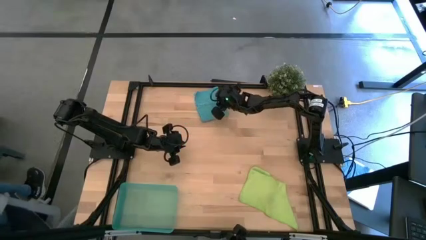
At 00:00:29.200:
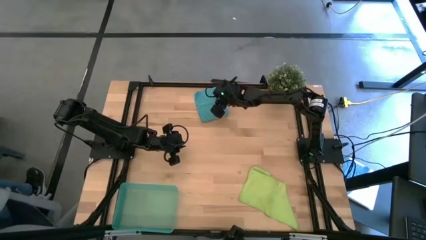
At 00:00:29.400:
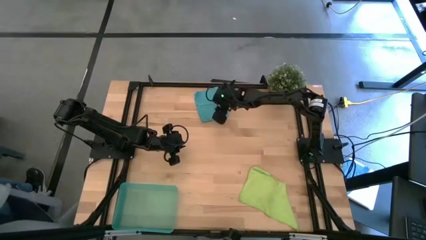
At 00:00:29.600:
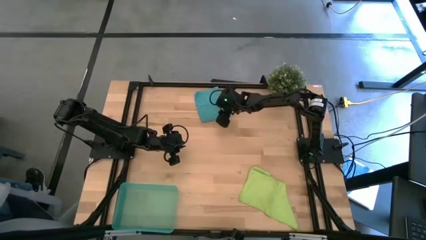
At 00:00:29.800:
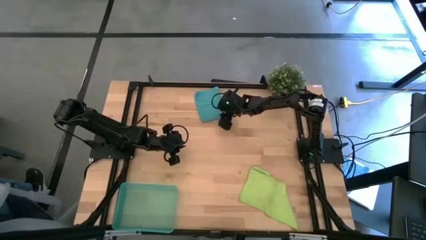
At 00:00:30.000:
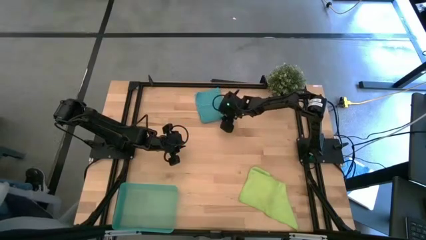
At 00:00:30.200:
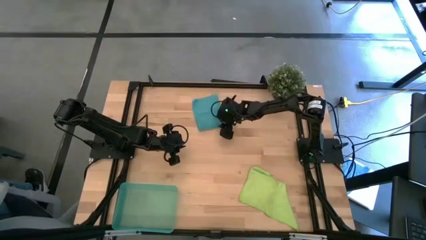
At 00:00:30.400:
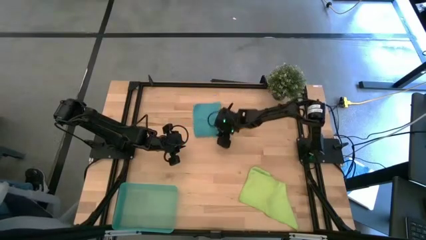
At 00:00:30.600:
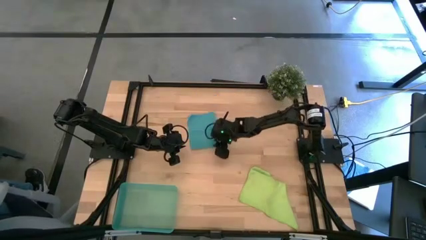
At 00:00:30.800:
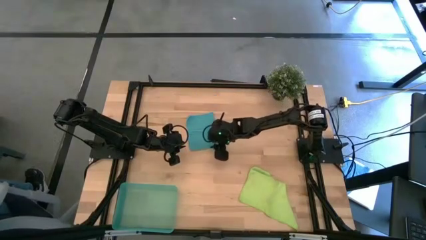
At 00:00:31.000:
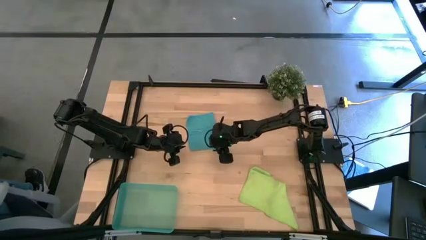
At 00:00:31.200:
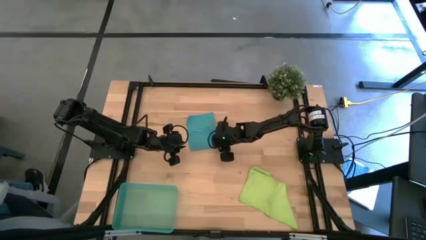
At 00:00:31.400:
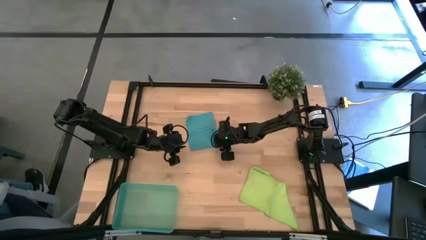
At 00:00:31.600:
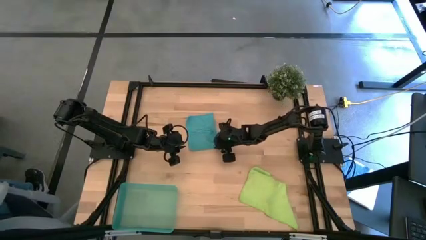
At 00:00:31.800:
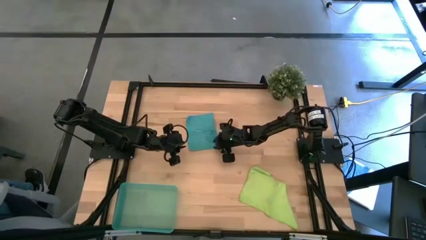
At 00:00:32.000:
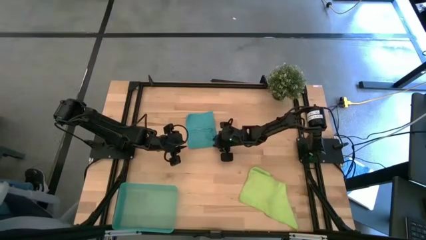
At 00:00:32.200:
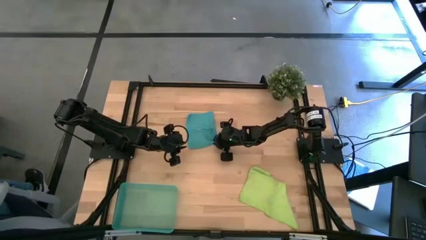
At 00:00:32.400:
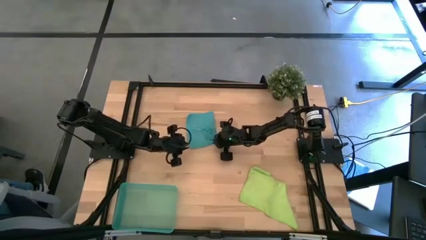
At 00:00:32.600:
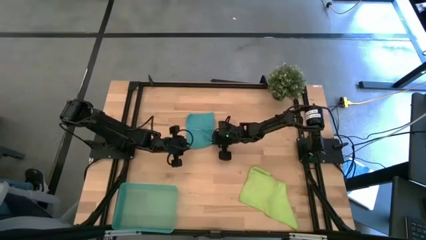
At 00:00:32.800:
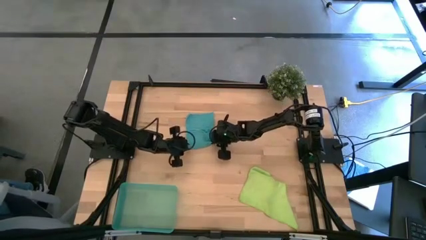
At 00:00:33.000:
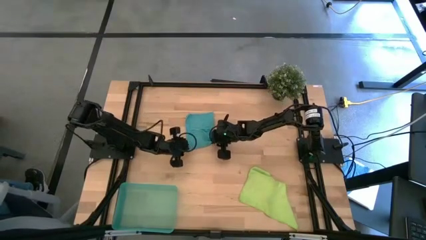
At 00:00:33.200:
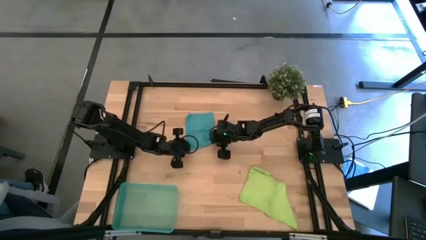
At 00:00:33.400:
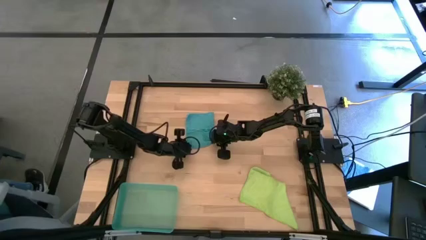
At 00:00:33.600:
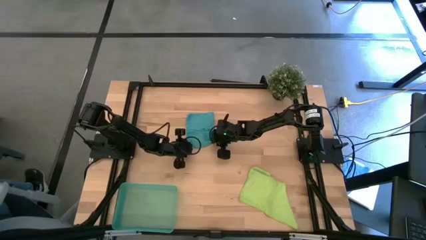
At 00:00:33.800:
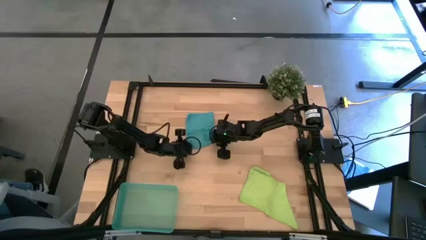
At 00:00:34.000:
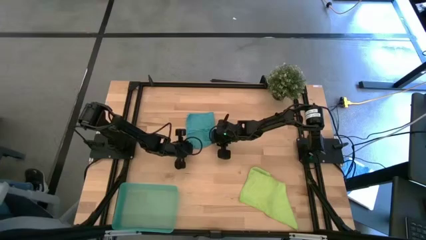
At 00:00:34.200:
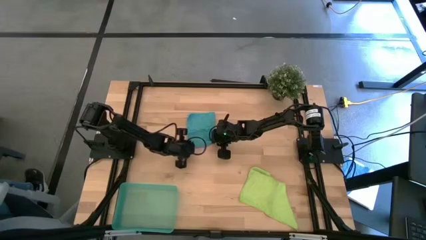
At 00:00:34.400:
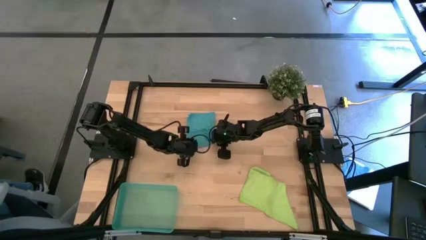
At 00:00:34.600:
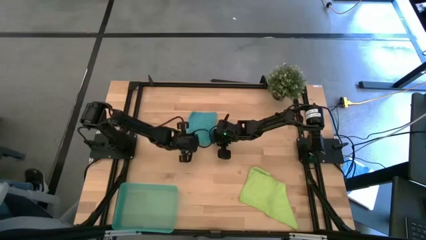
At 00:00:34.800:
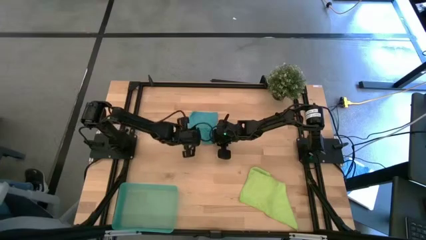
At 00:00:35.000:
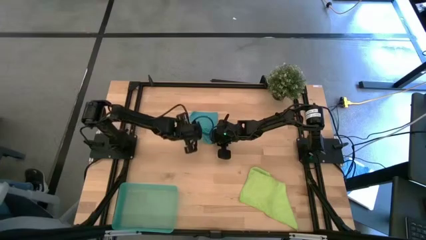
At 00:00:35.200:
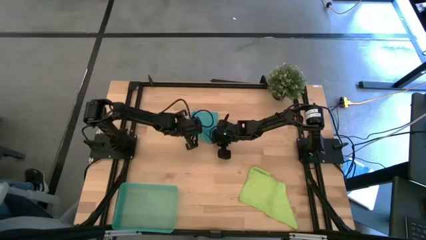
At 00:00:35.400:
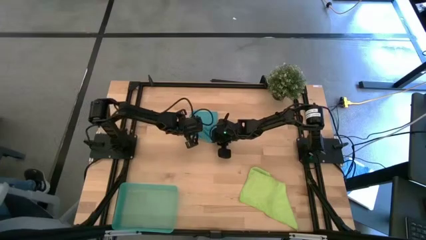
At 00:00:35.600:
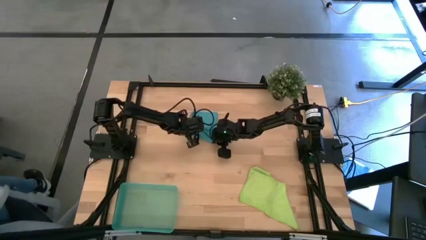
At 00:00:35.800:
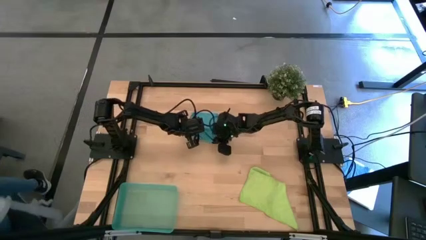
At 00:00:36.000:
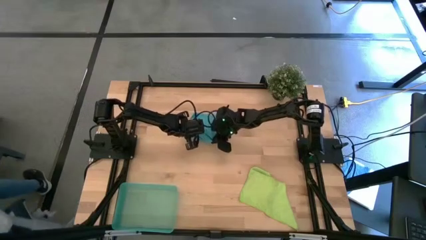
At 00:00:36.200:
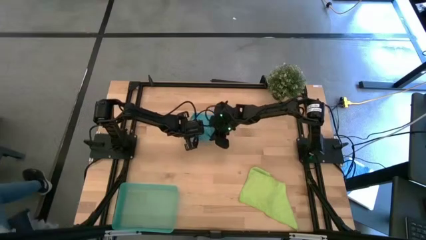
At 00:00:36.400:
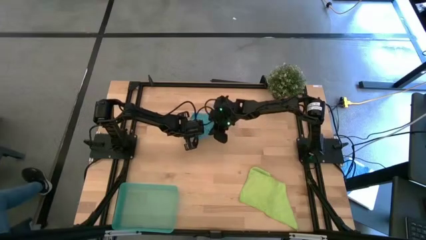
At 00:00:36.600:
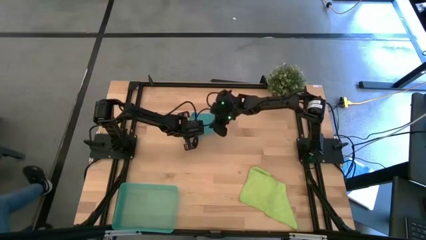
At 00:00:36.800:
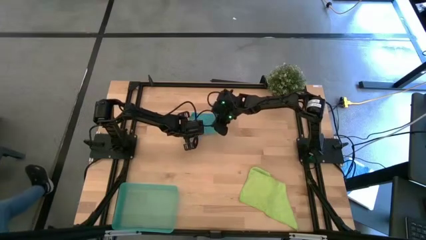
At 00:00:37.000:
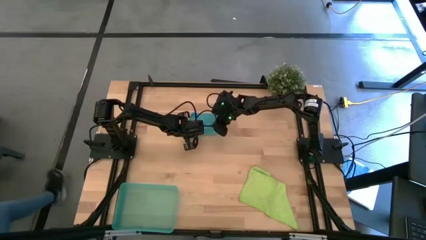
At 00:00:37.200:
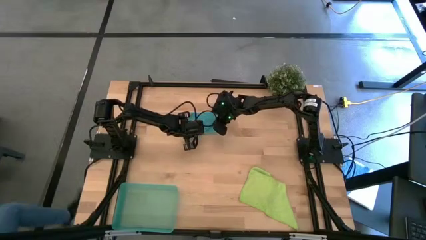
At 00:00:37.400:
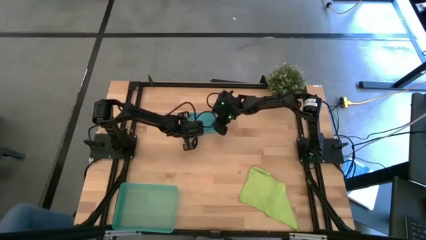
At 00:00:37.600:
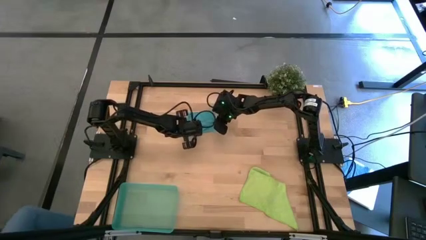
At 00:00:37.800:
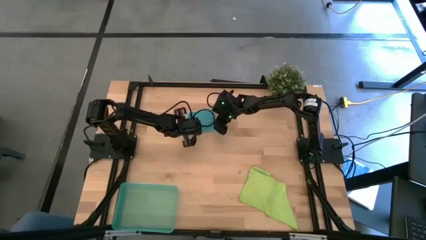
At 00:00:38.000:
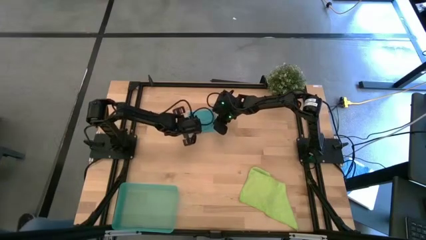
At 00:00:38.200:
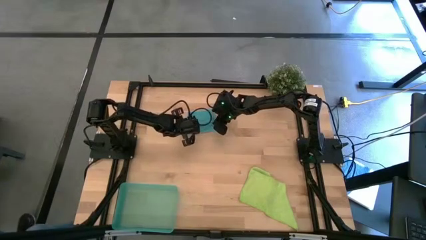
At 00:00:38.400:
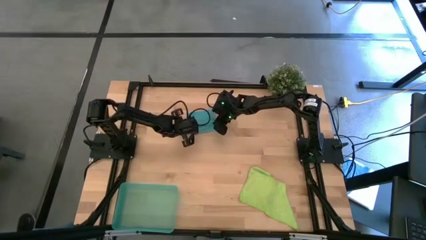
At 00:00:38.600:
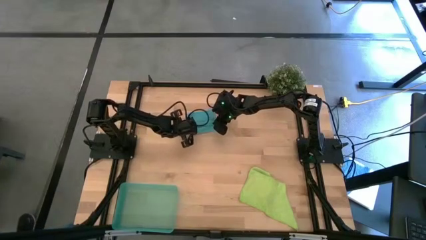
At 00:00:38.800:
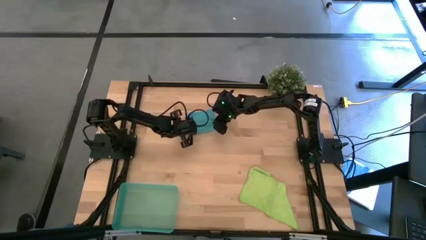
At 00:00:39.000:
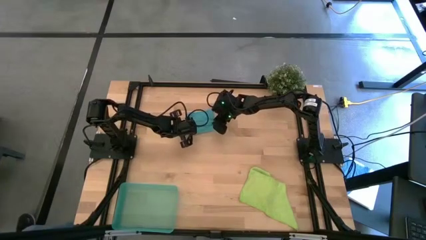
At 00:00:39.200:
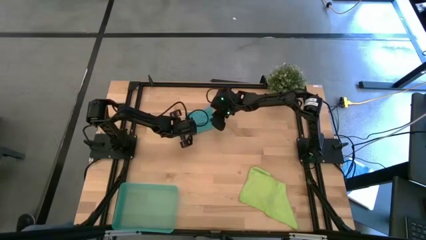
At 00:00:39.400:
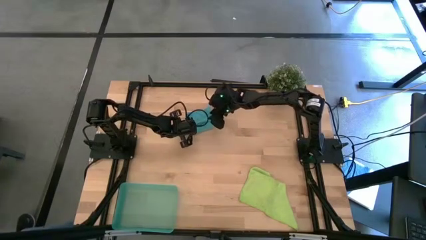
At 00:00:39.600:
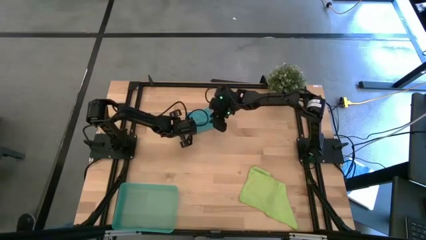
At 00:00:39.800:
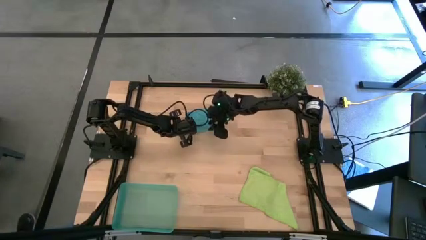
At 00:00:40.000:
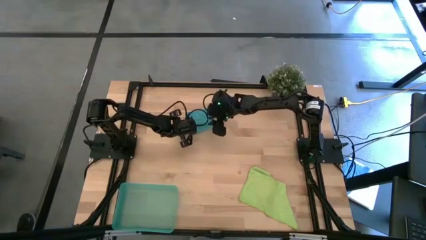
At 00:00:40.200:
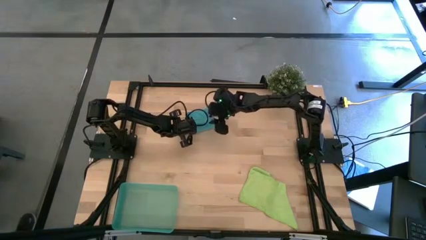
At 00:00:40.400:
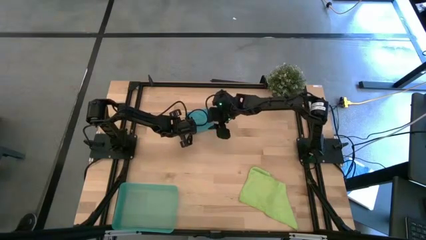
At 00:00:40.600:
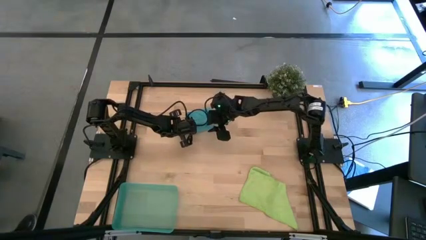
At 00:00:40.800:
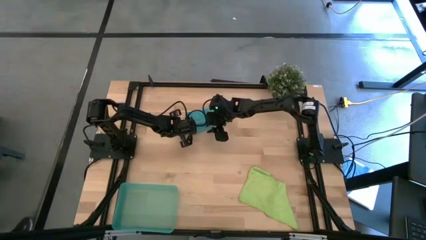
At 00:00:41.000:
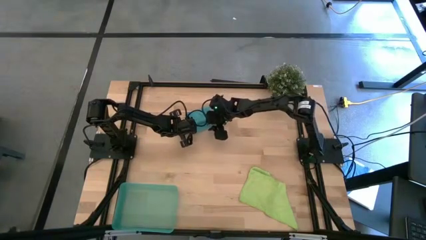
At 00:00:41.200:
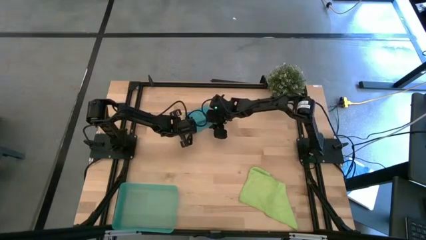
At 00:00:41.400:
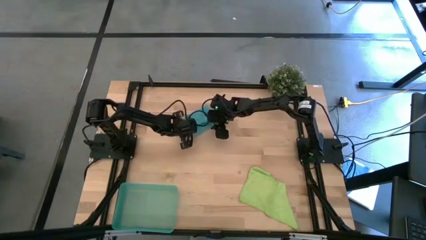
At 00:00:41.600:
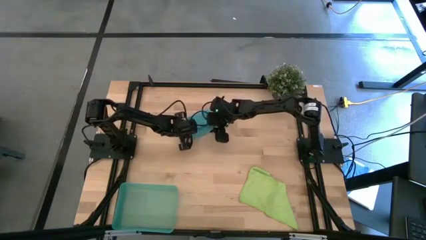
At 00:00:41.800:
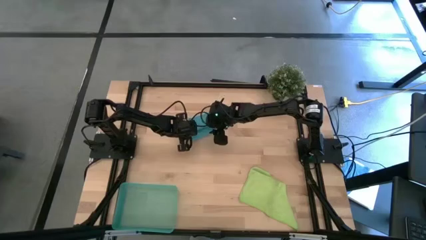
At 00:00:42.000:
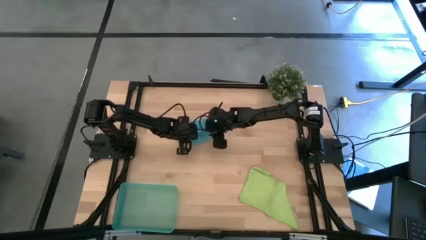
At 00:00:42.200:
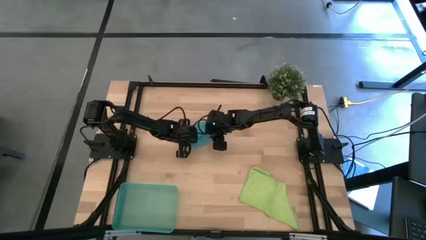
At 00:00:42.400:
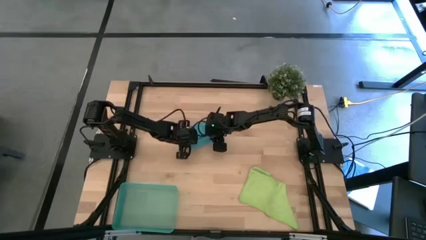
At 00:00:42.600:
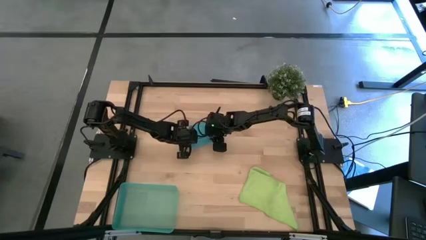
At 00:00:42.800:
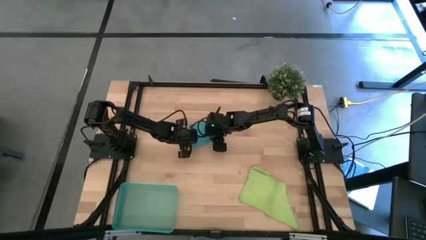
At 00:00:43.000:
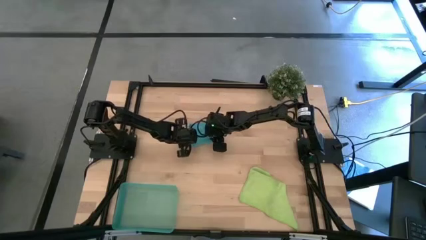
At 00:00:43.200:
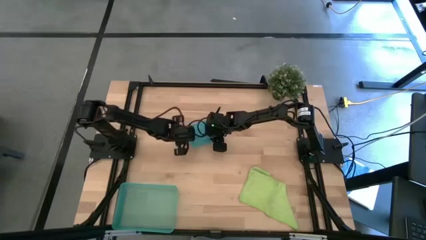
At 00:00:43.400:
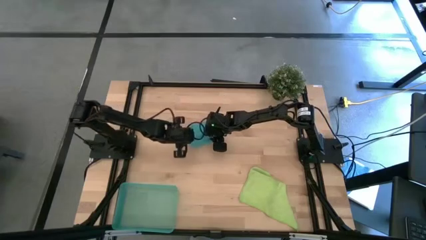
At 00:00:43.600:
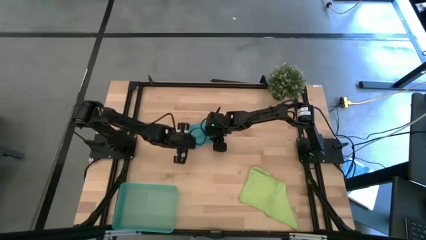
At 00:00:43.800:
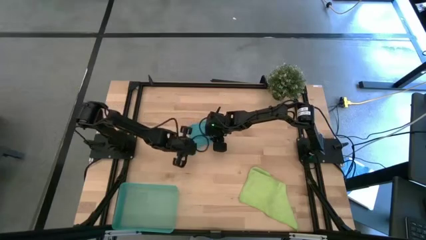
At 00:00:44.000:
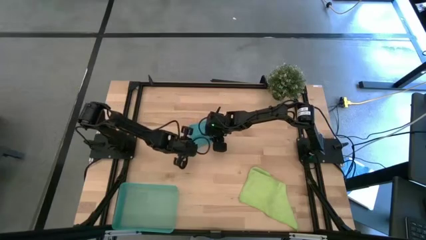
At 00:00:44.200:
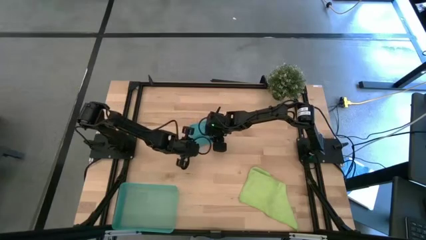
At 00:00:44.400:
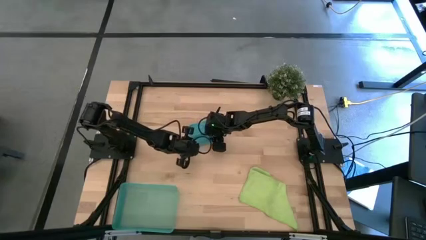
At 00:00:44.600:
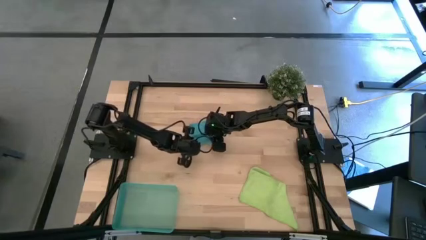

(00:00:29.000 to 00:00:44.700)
Task: Roll microfiber towels into tight, uniform cylinder then place into a basket
Roll the blue microfiber towel
